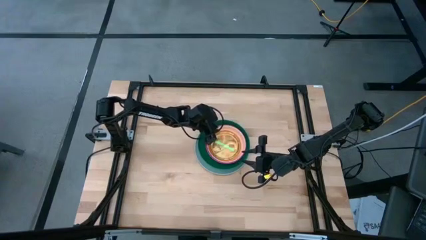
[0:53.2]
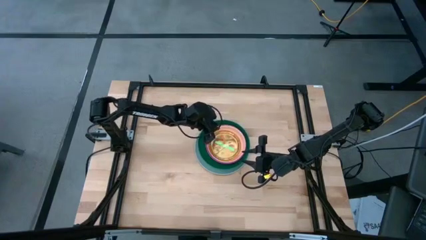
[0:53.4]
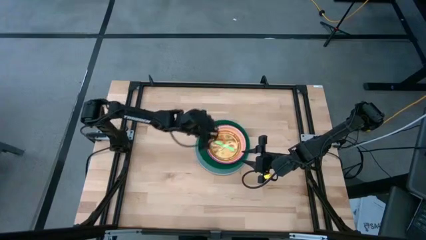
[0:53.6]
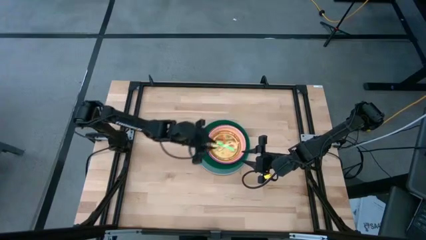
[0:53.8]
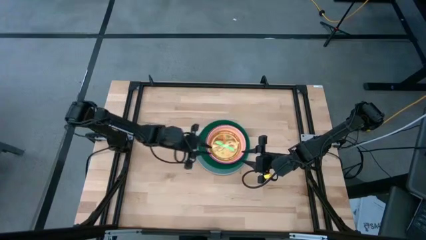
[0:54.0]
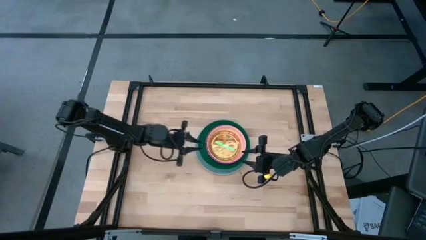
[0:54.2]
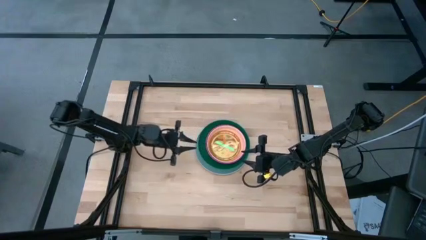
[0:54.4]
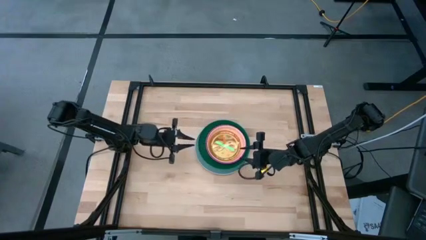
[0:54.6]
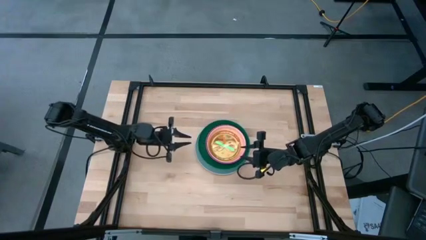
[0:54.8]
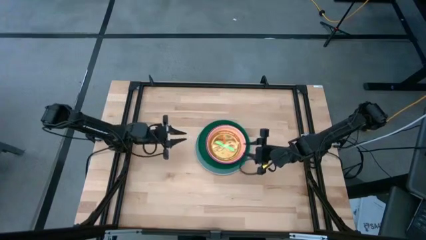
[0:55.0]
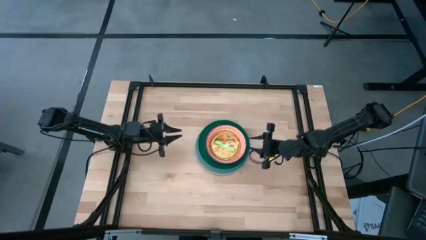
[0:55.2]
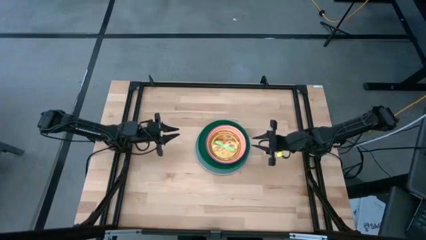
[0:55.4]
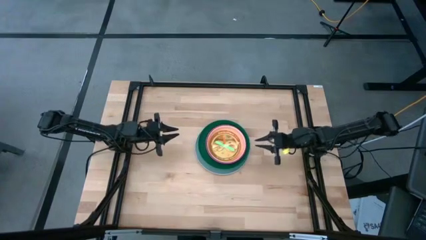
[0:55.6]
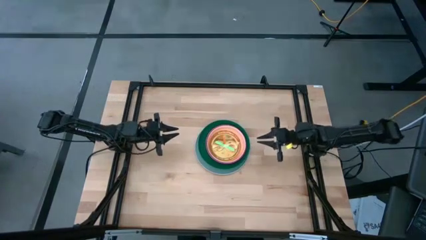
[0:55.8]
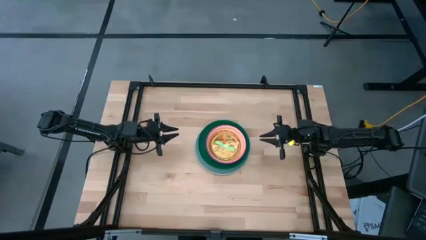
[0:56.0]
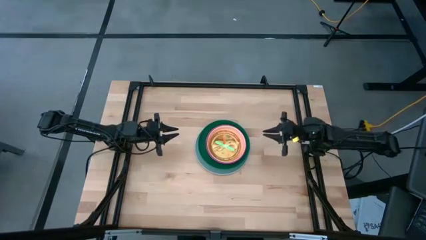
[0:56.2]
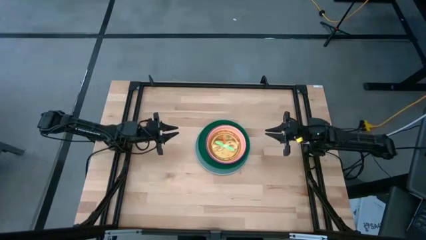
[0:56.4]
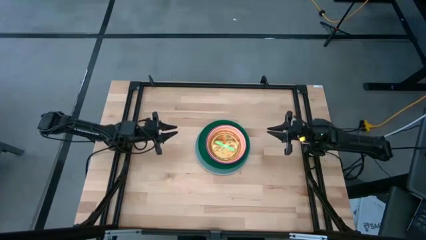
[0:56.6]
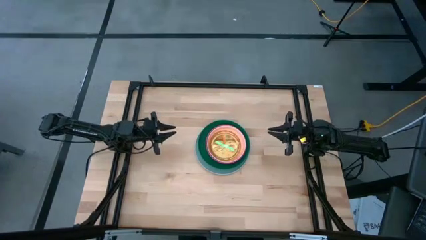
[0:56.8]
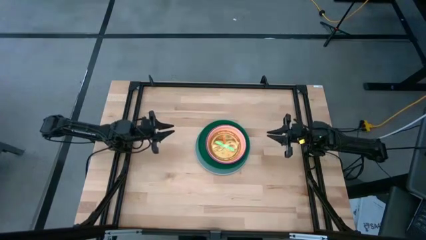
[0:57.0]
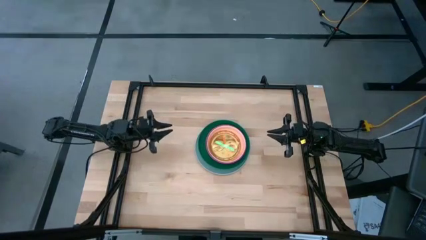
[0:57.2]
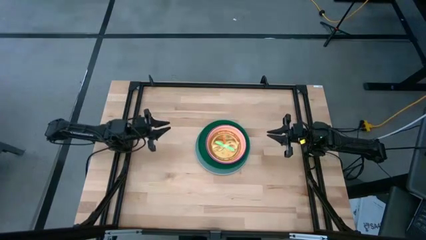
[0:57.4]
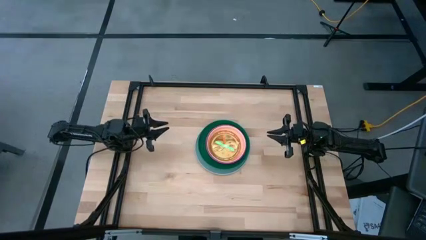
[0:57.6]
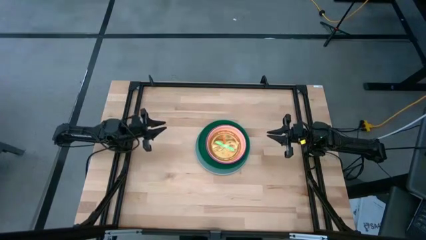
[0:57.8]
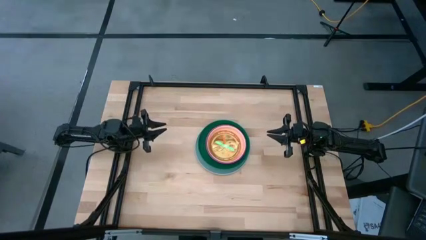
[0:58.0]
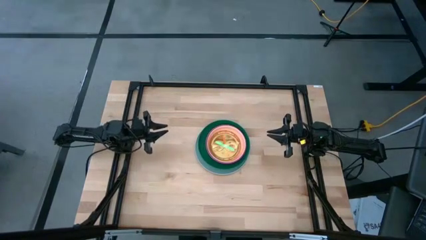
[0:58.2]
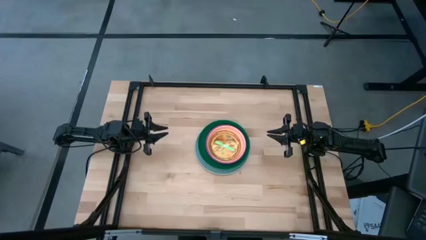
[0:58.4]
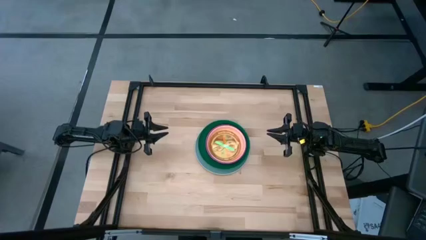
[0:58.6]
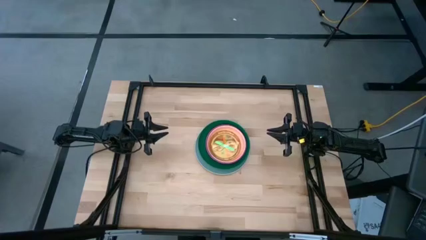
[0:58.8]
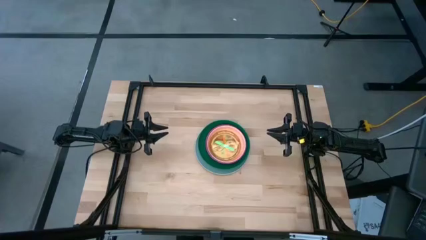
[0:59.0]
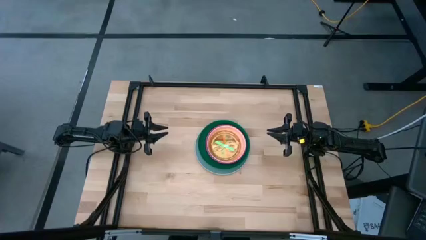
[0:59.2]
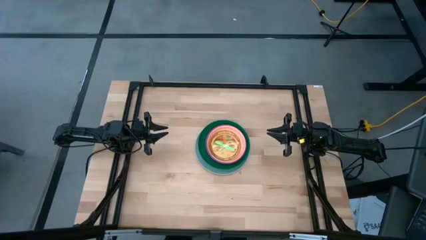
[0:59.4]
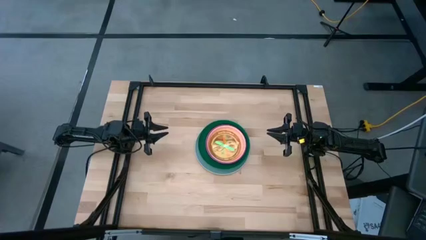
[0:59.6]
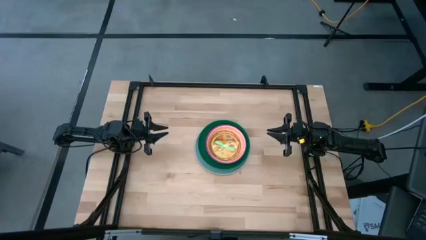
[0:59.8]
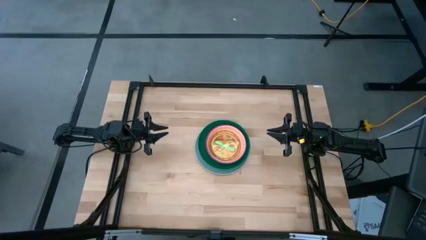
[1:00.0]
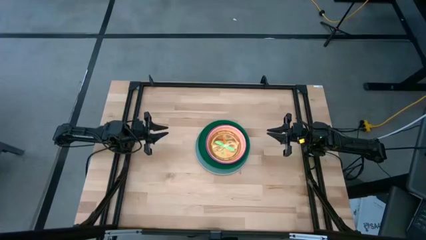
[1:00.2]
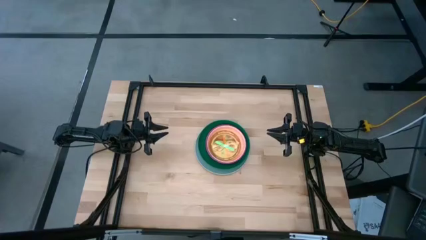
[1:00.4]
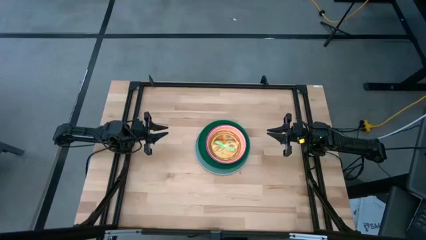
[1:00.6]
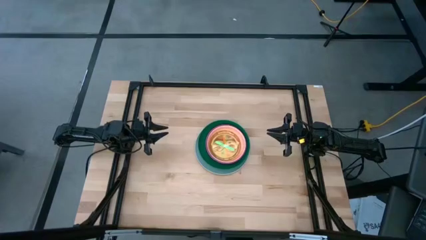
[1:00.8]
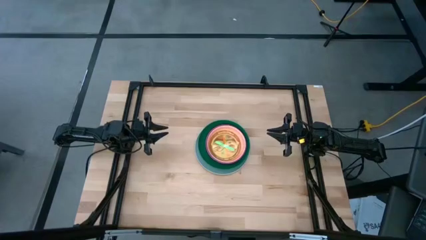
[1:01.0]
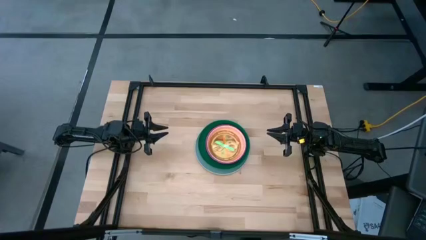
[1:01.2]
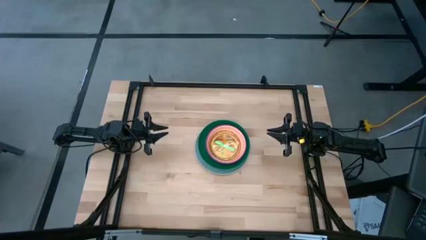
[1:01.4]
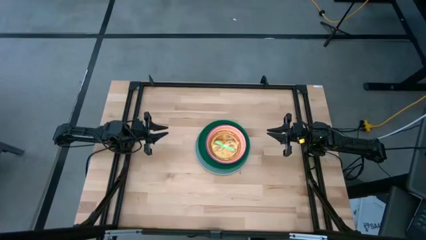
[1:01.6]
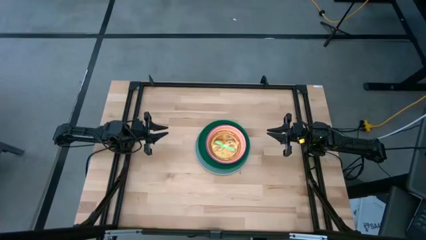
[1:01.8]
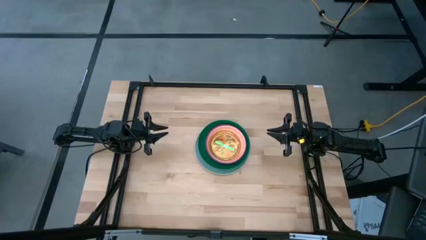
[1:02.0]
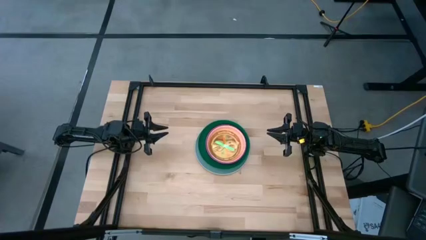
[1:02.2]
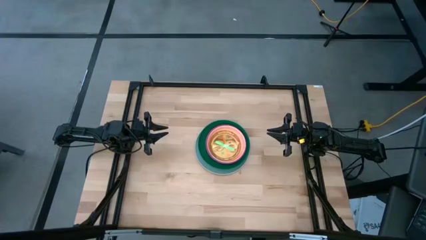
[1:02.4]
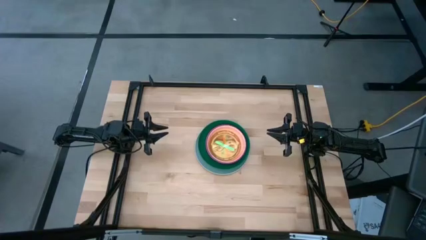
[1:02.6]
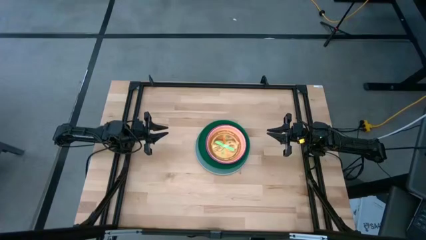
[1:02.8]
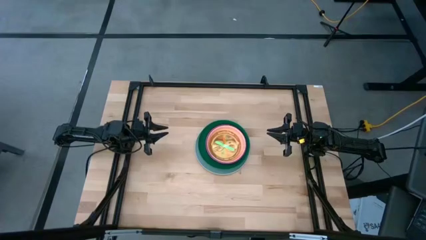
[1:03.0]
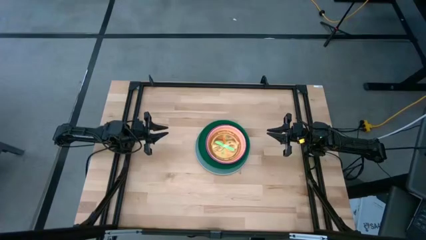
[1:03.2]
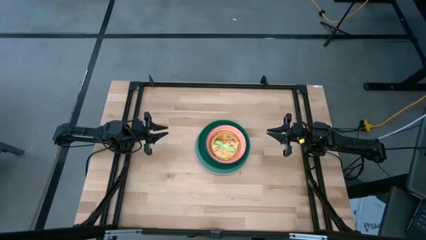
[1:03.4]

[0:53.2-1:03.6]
Task: Stack plastic plates
Return to Home Position

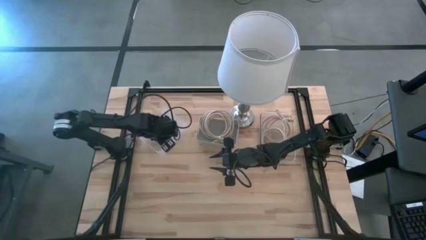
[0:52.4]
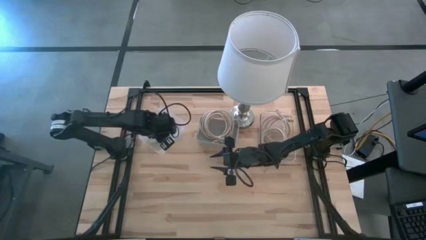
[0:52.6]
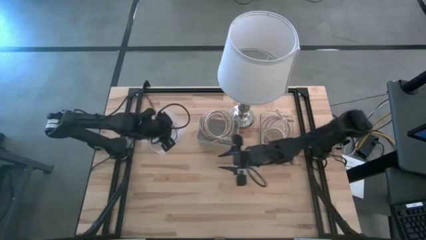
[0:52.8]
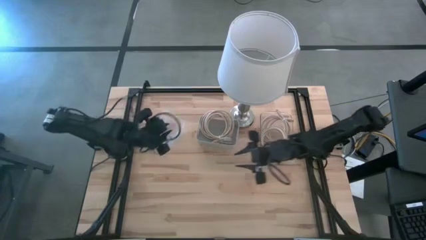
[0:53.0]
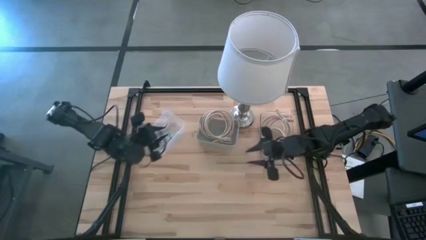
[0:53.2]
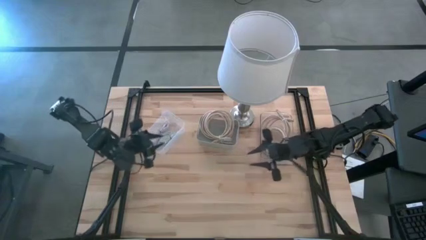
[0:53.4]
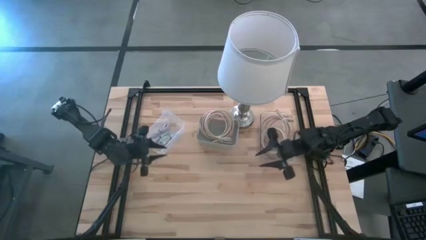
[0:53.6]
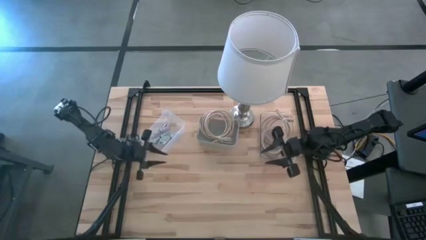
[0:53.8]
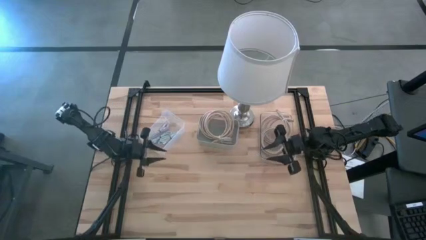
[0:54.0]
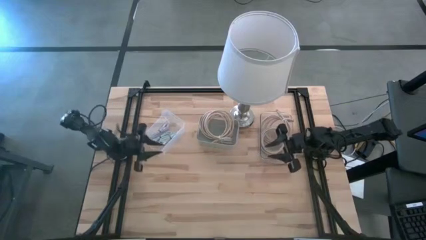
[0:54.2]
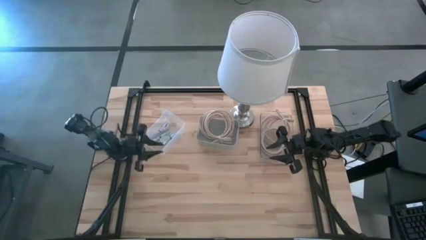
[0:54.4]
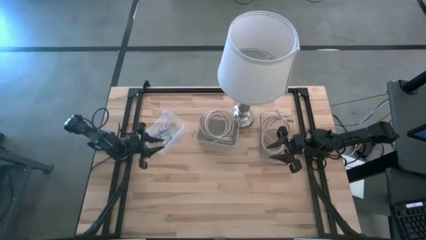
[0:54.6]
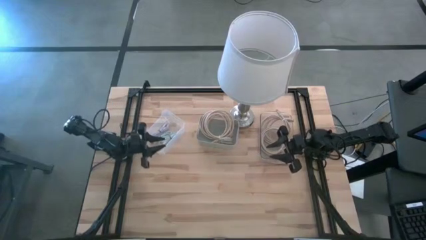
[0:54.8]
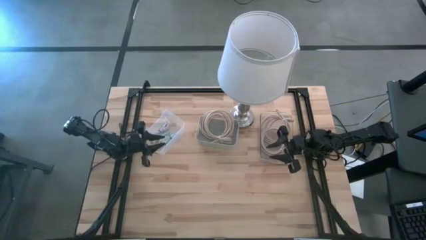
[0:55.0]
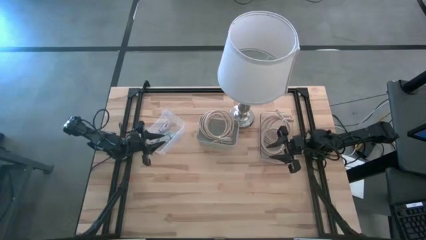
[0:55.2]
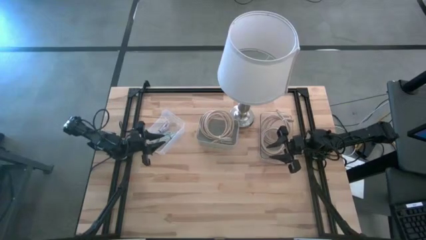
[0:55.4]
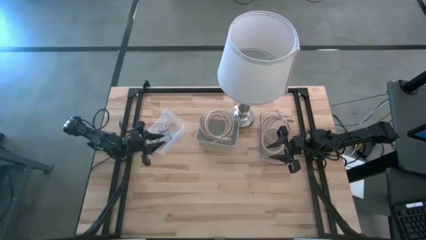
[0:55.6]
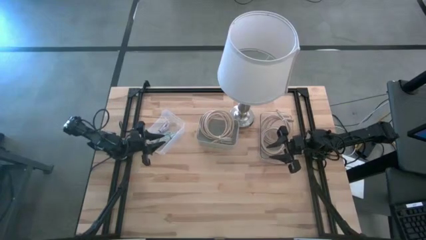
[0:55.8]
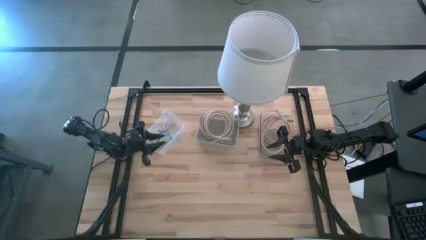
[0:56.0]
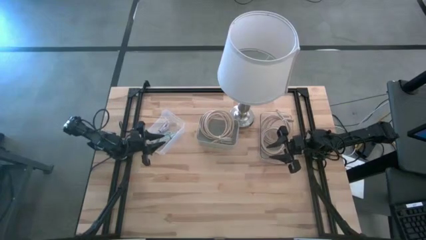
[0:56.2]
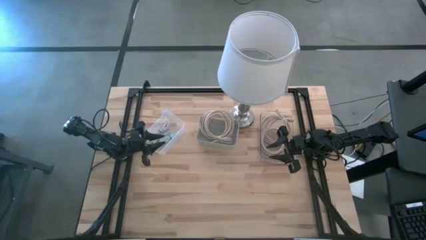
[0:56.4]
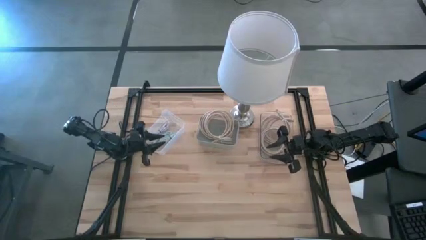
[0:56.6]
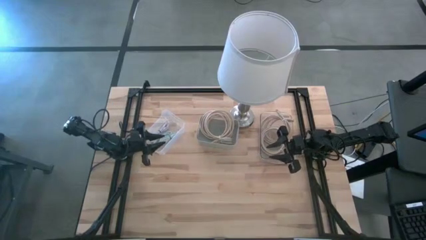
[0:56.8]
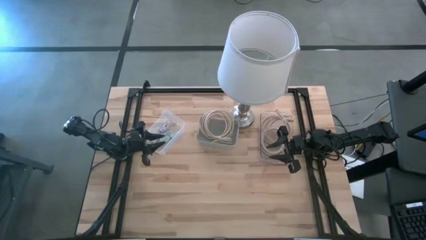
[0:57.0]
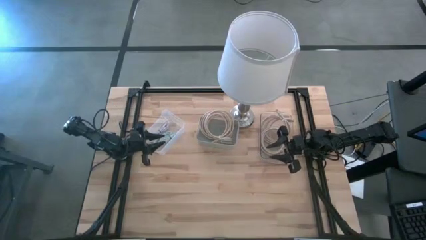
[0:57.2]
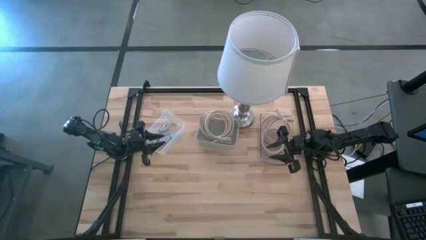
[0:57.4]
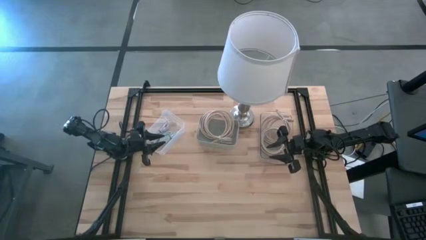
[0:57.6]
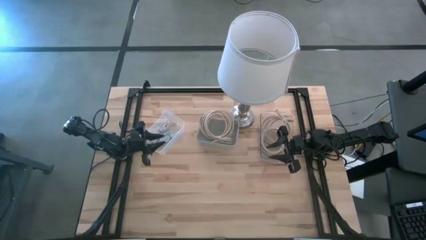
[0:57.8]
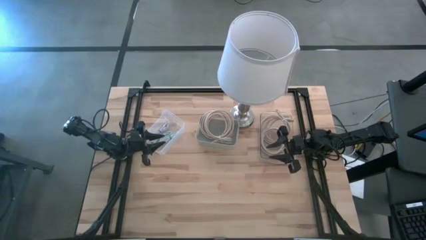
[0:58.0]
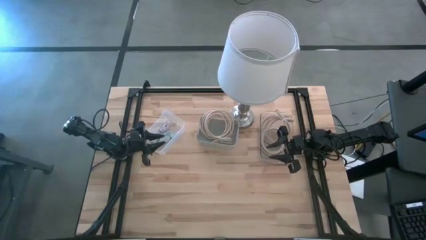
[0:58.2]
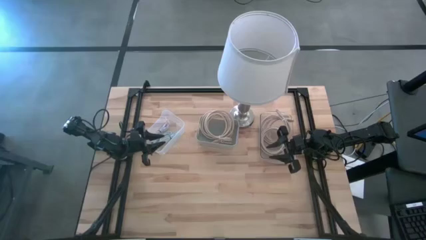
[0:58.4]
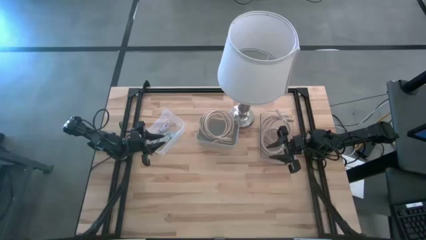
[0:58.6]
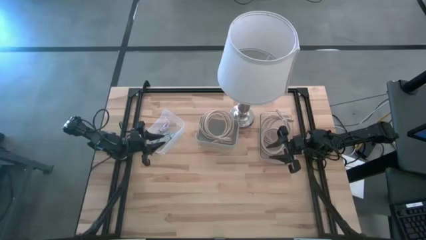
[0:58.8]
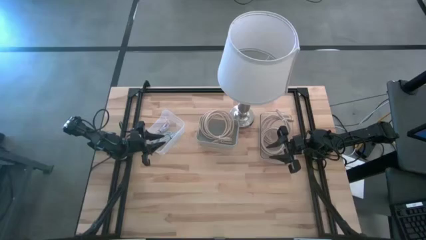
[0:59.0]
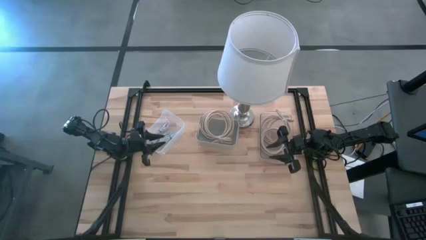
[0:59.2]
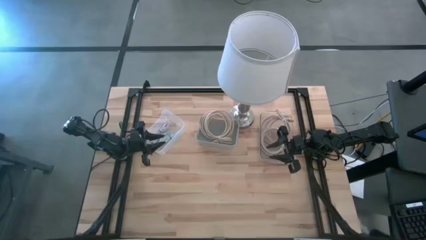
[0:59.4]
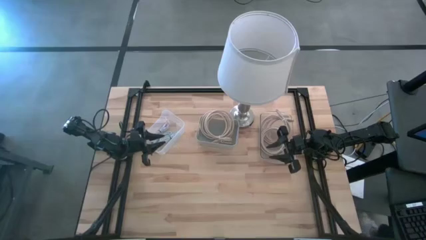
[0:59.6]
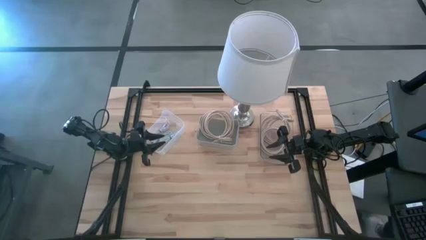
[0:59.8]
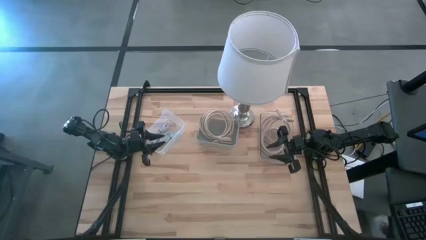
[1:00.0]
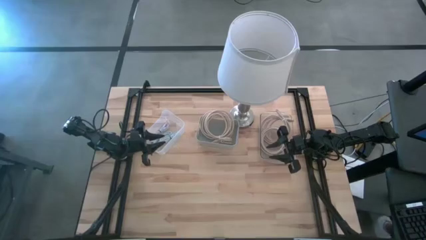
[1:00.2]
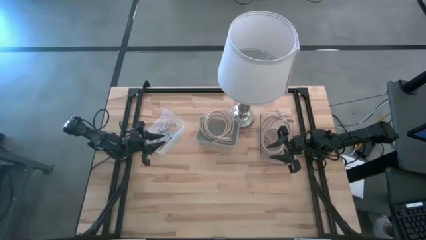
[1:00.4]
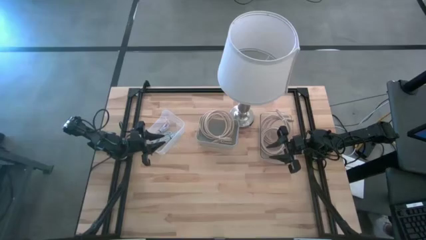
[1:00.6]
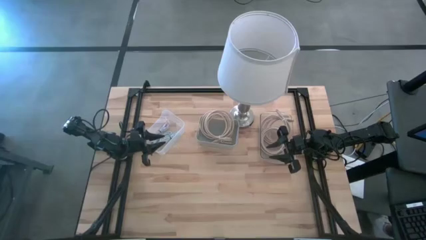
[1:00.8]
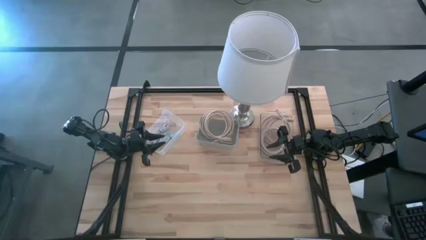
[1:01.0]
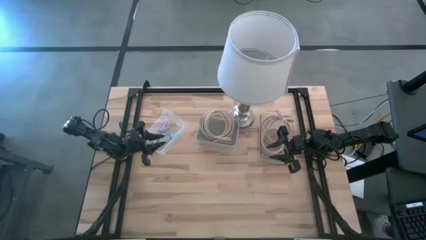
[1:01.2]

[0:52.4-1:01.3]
Task: Pick & Place USB Port
Return to Home Position
